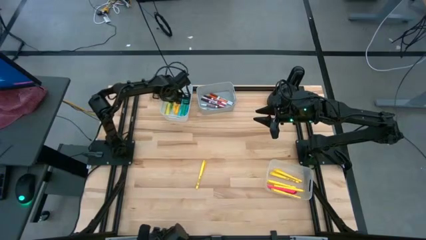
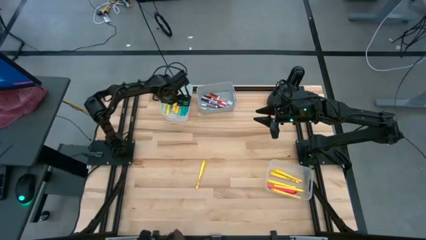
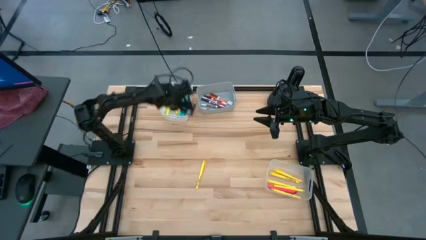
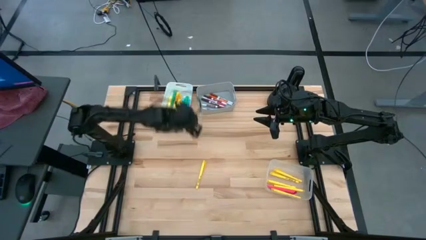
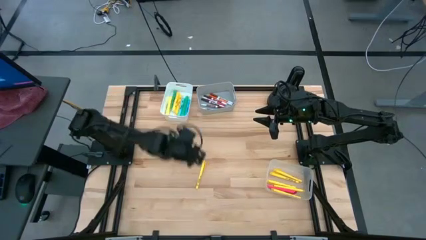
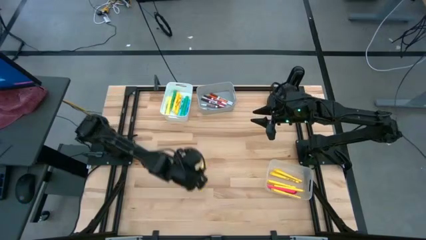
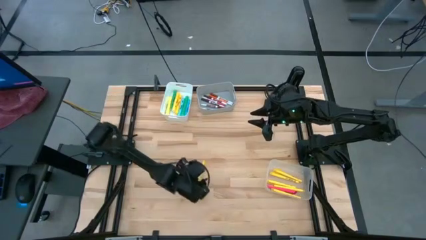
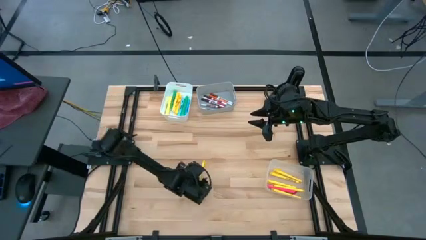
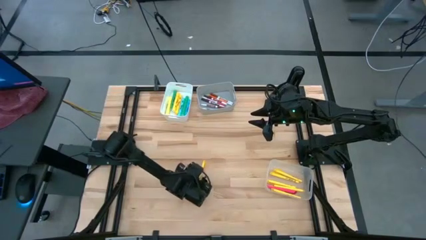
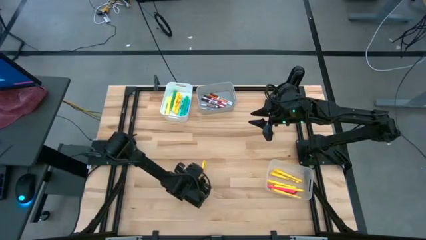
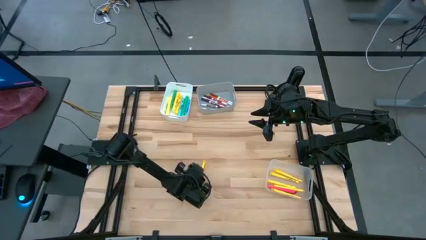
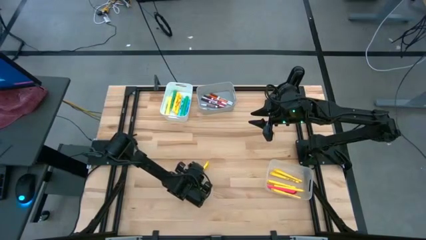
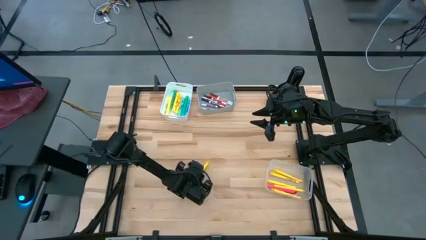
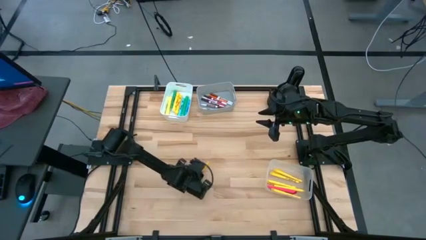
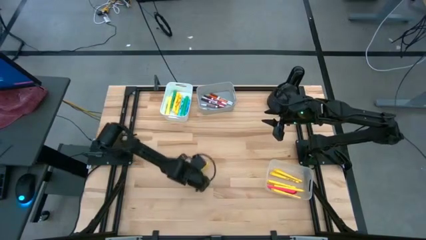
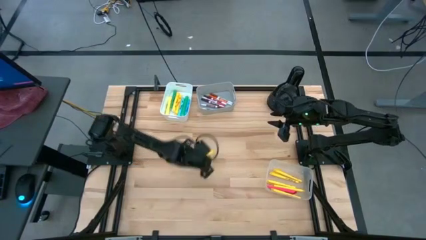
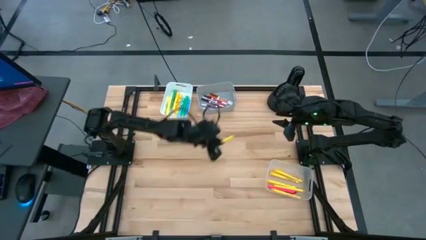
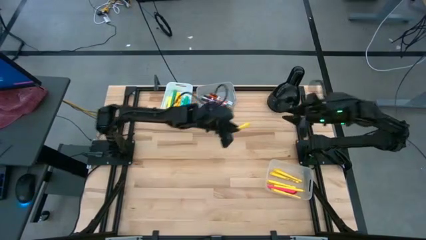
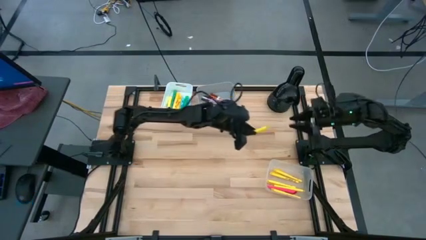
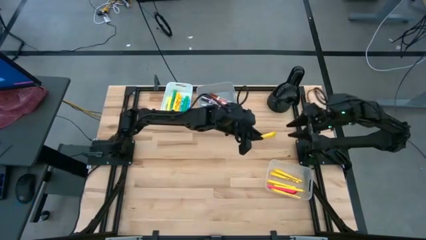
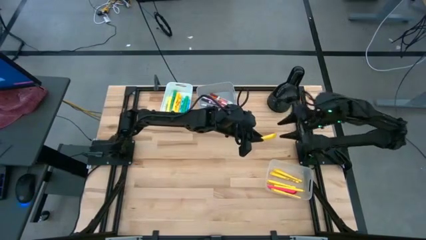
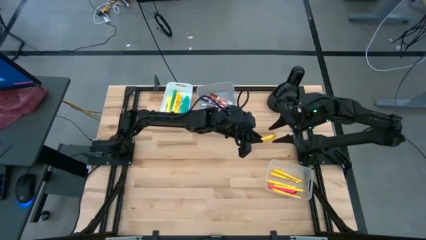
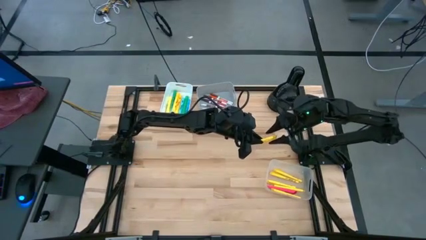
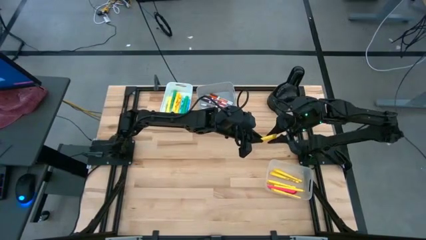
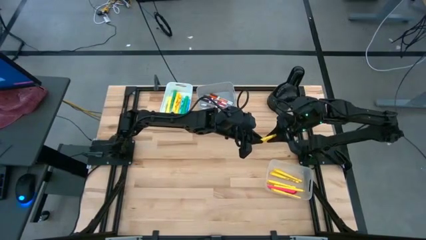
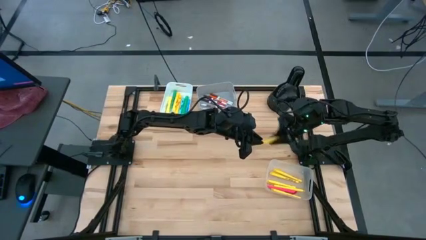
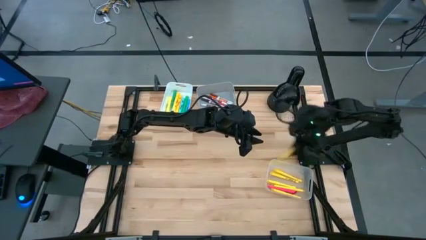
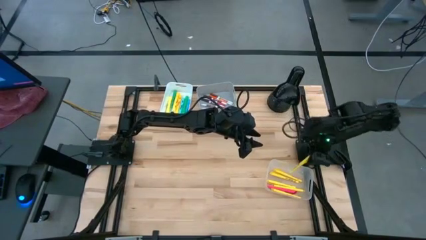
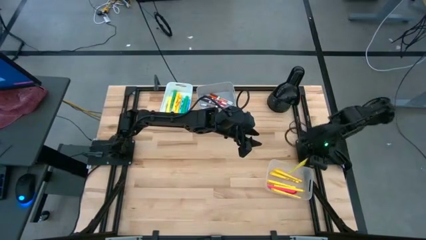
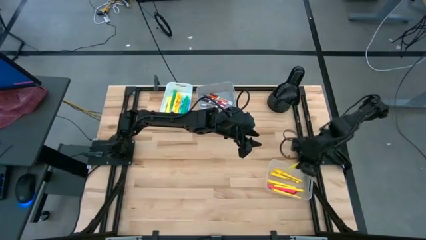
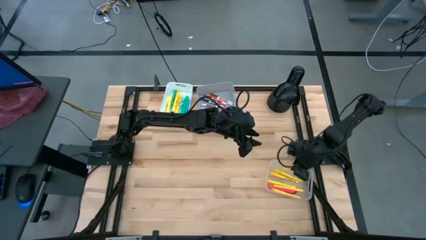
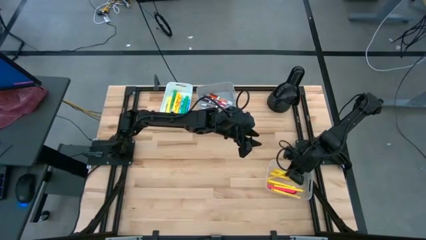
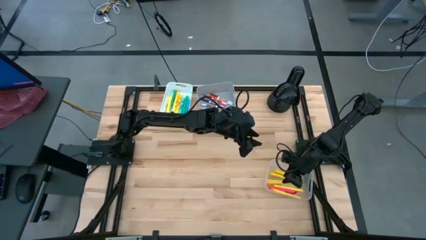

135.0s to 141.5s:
Task: Pick & Place Markers
Put the yellow pen into the transparent bin

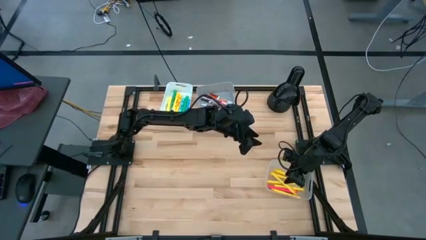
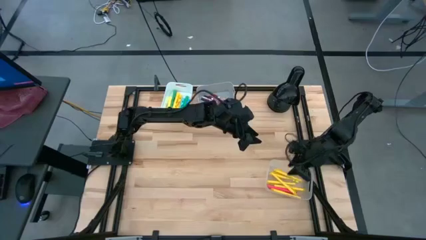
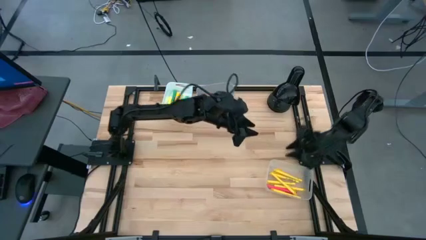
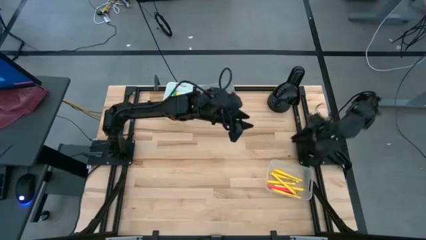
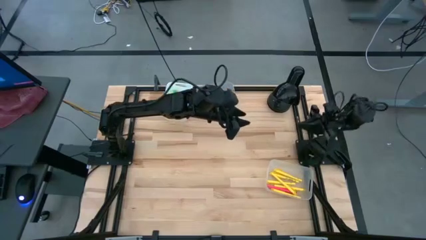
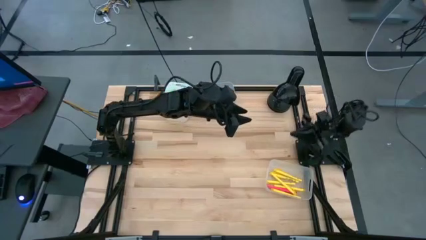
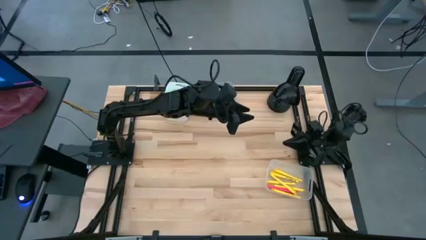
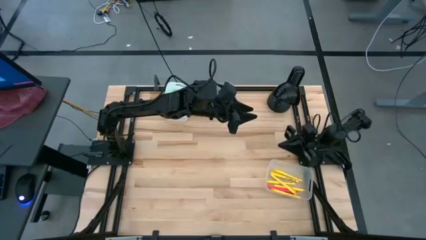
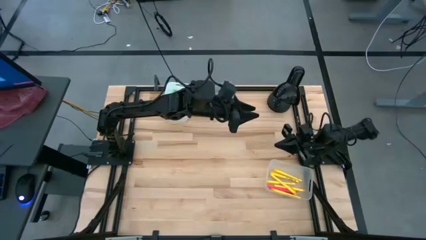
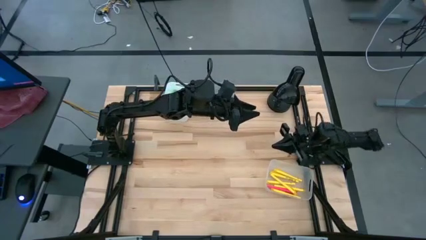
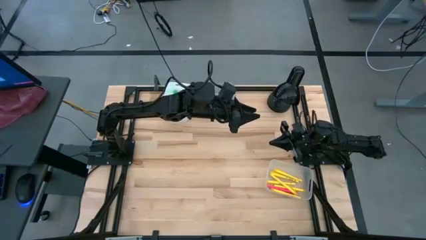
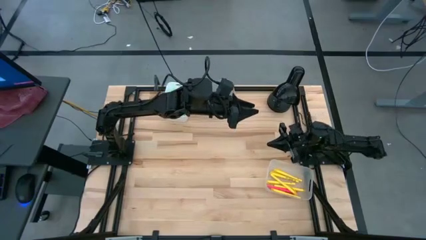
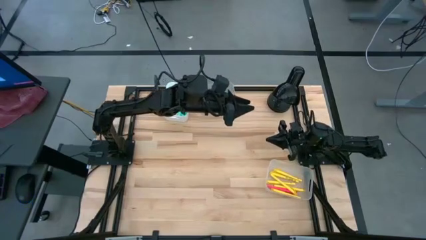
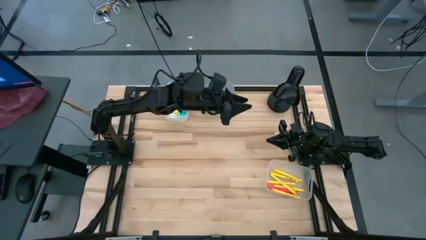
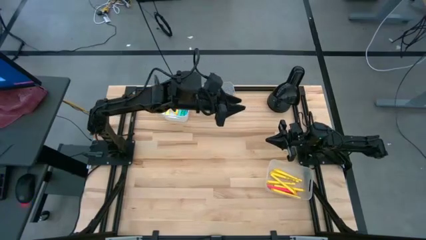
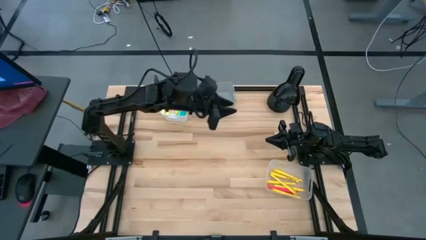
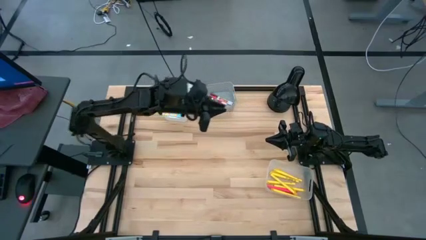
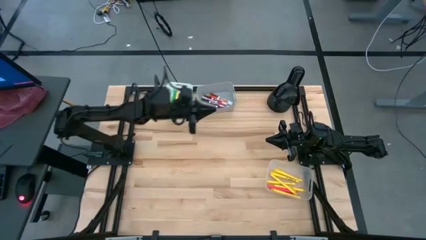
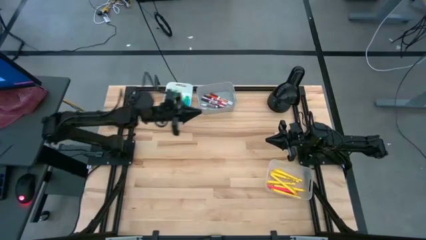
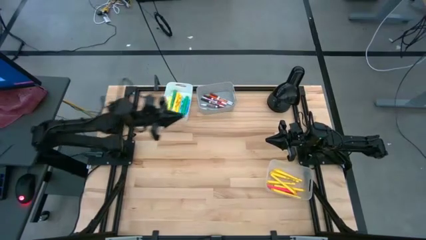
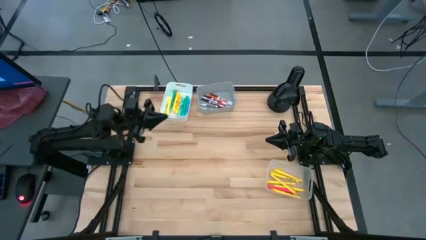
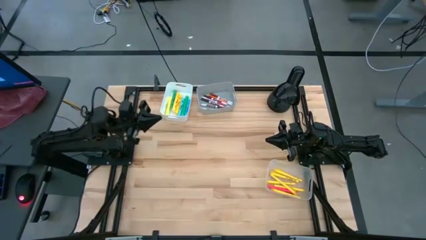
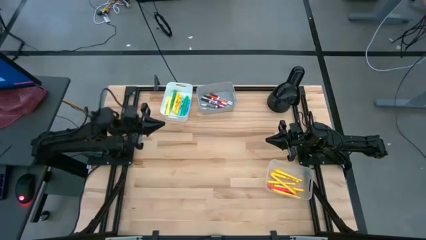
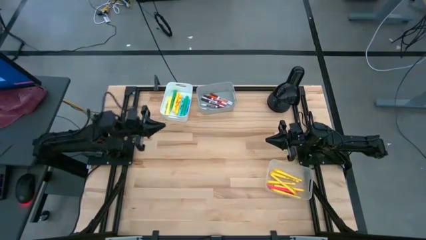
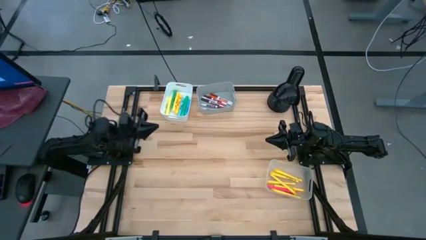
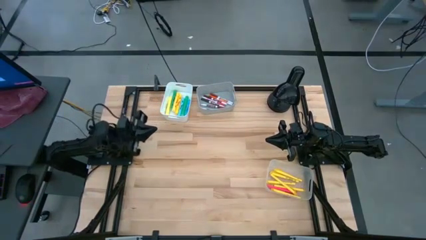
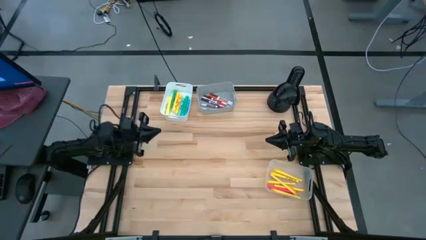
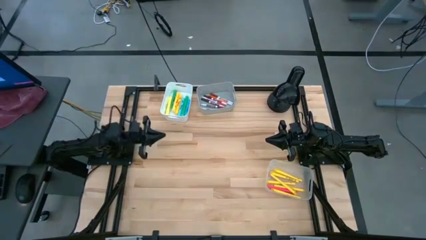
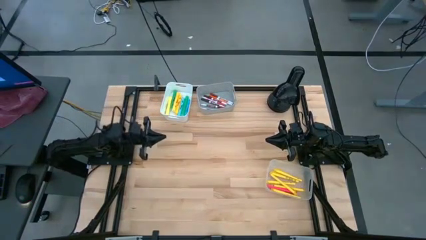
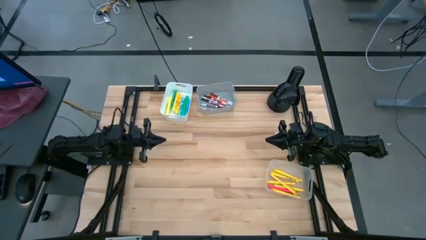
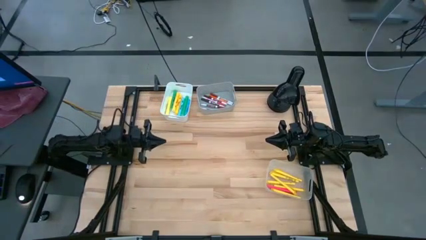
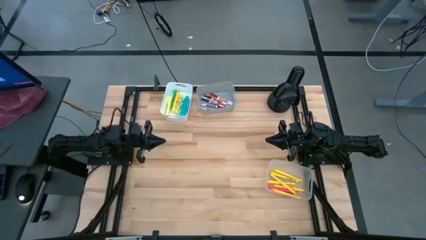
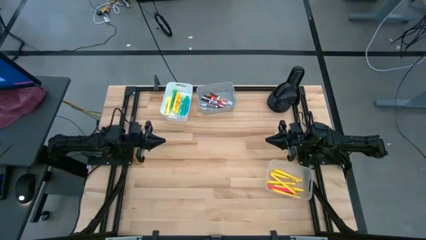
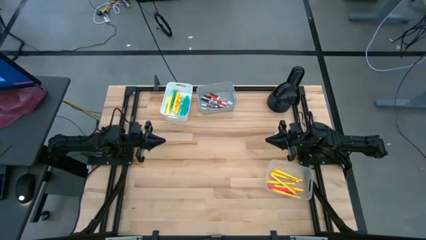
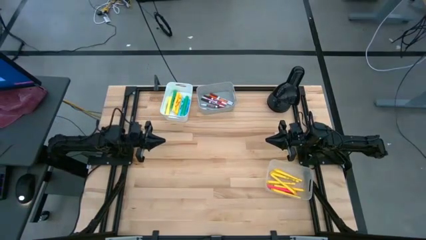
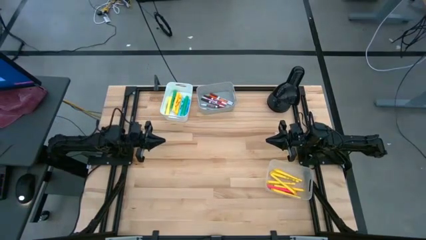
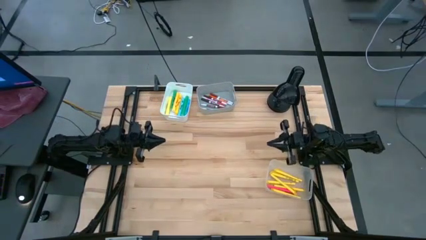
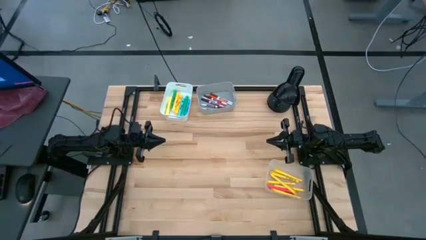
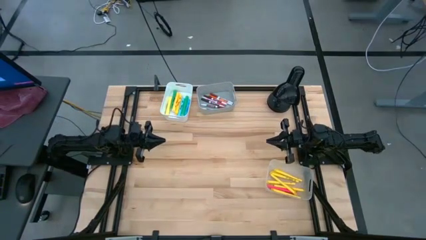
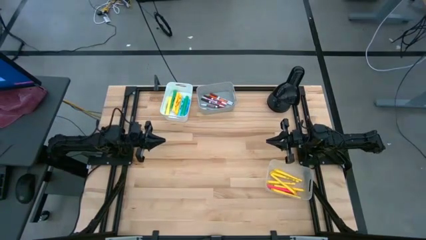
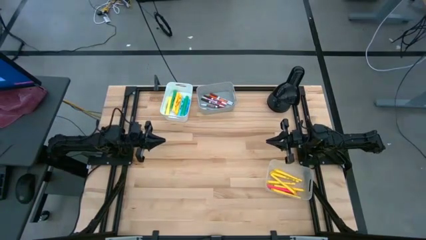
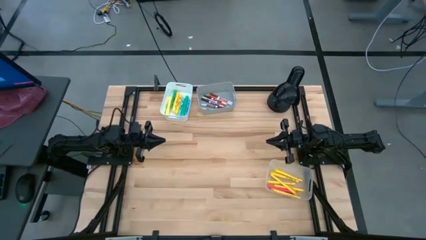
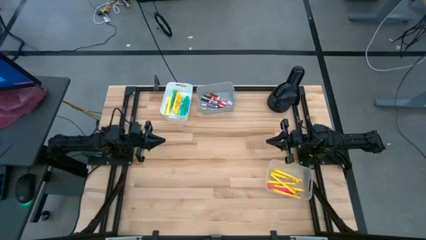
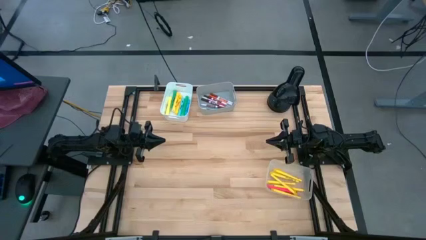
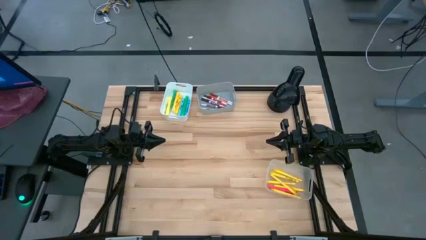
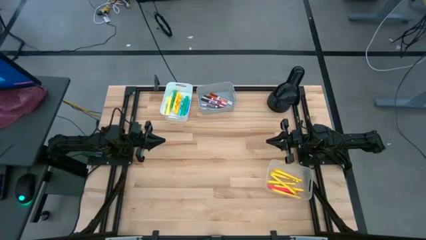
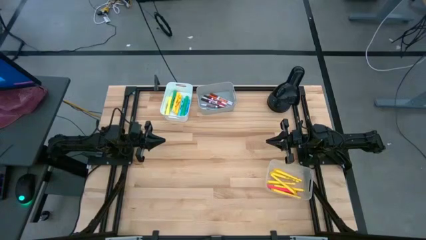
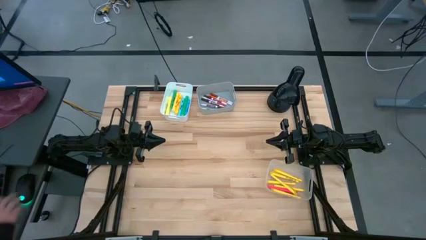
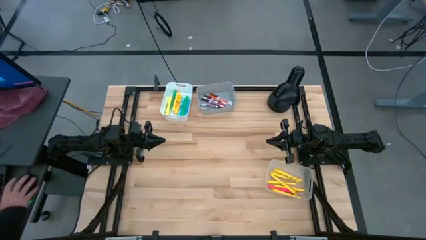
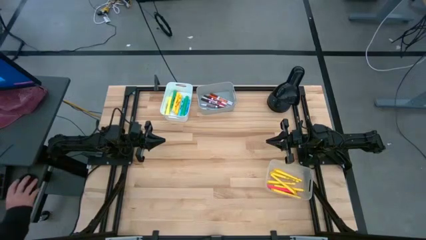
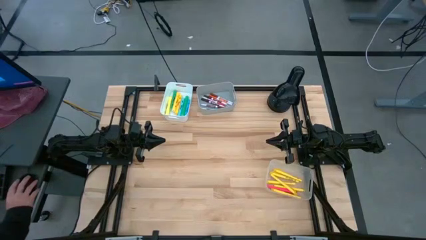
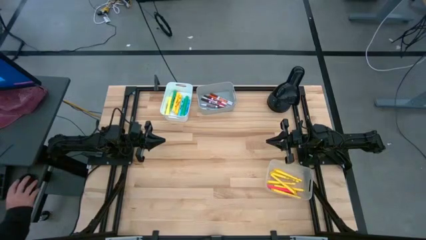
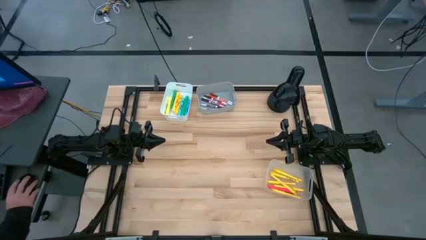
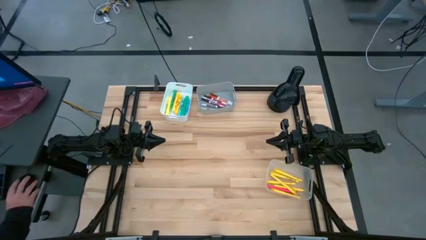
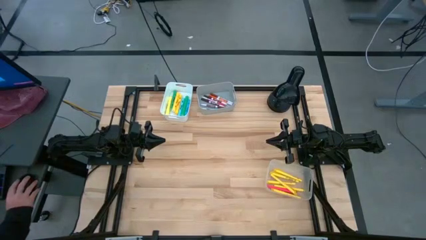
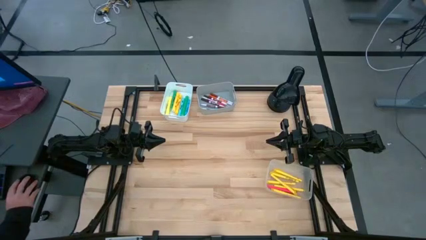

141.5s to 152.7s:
Return to Home Position
